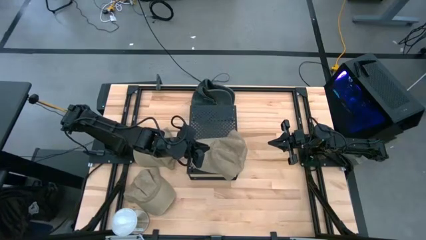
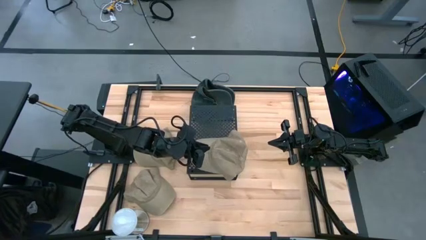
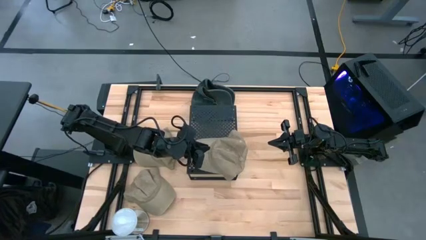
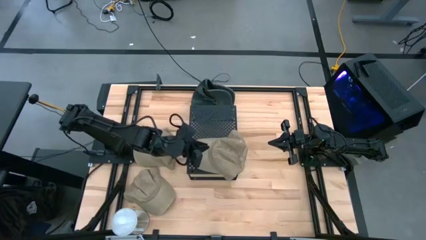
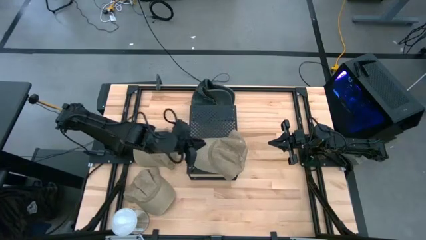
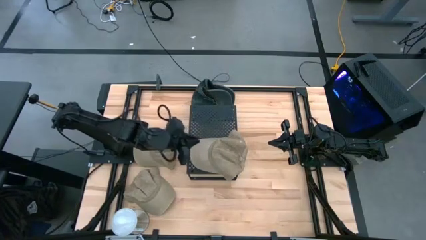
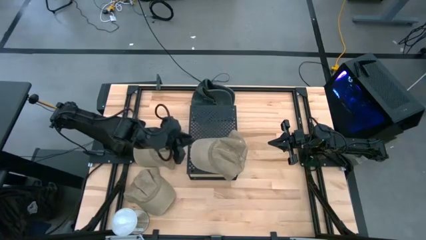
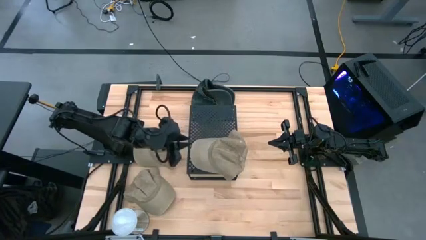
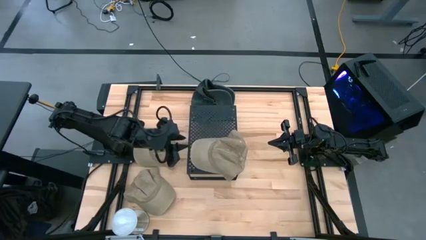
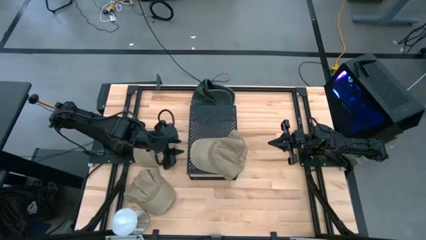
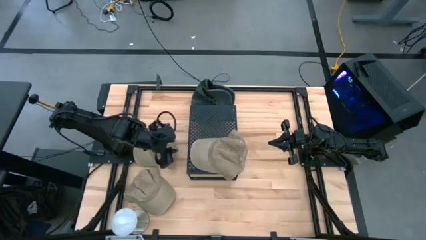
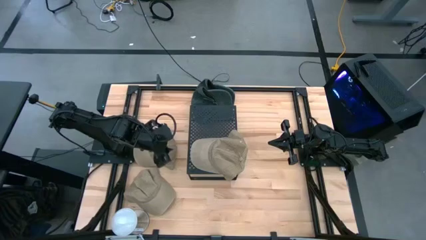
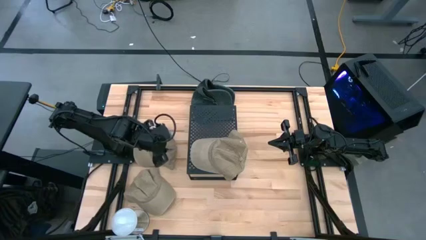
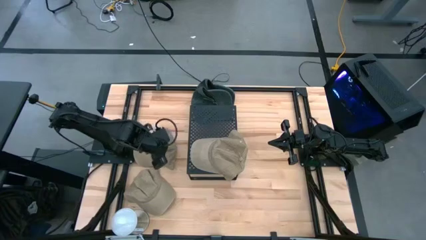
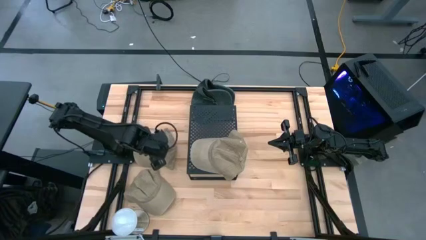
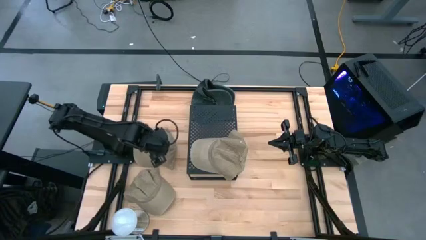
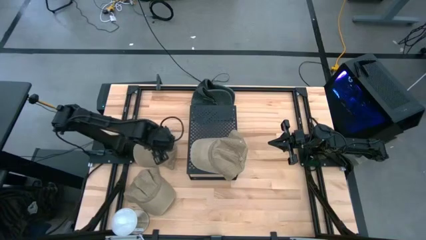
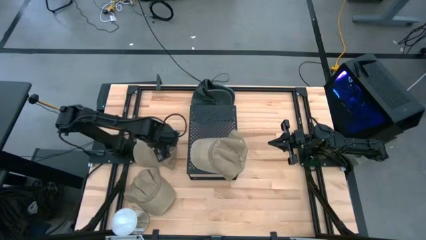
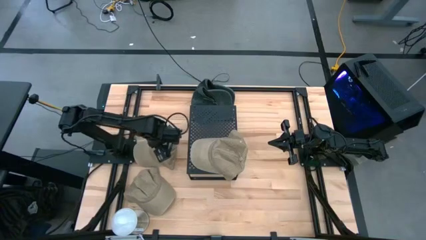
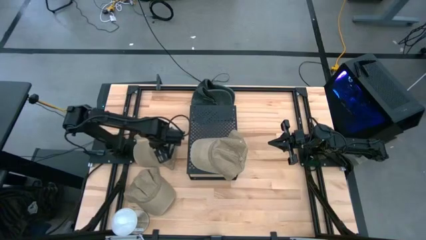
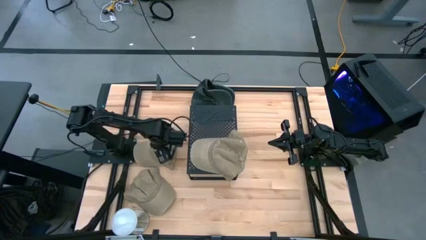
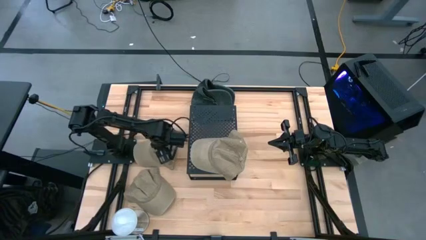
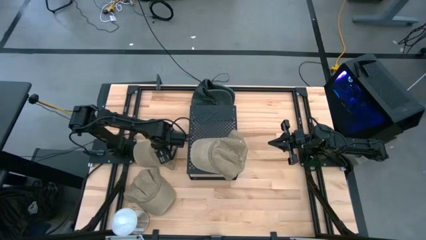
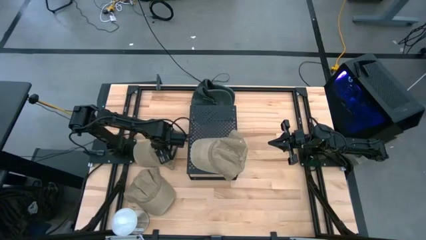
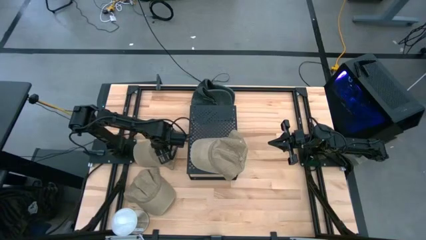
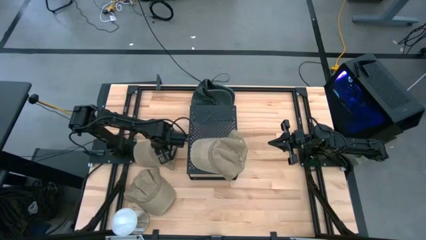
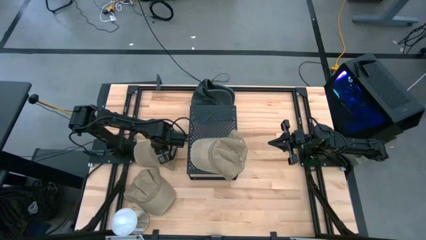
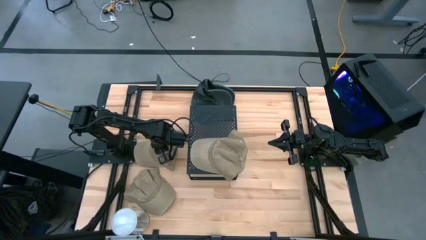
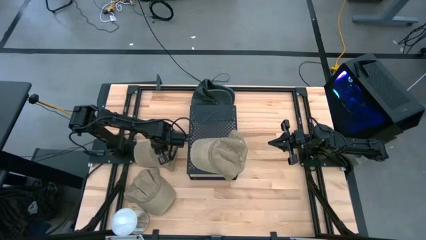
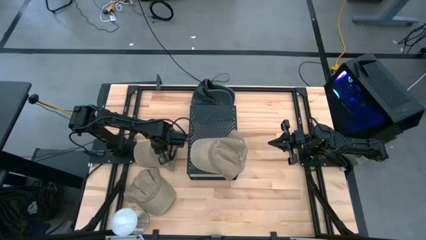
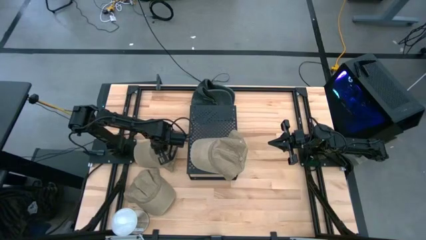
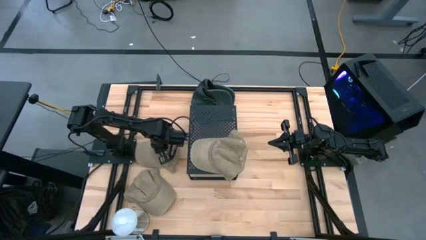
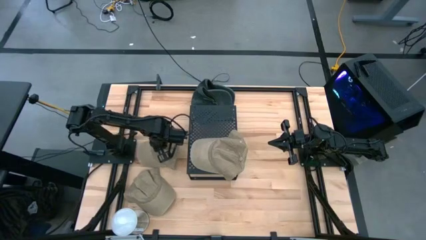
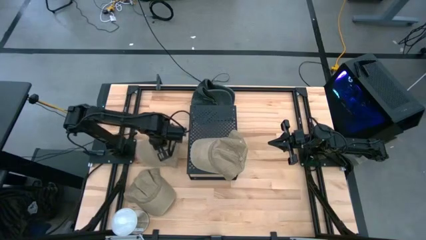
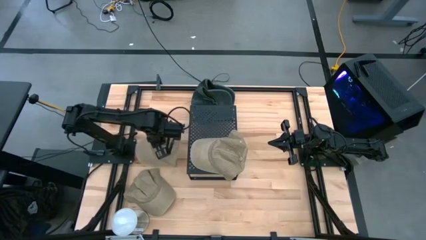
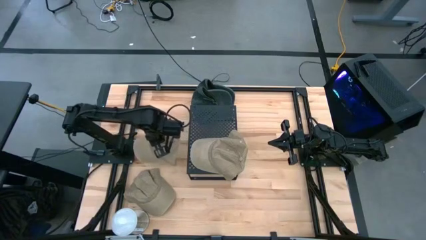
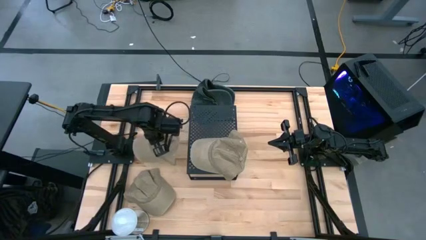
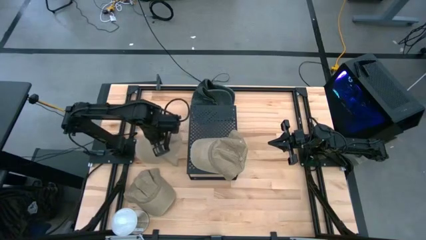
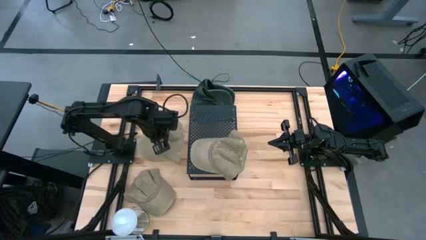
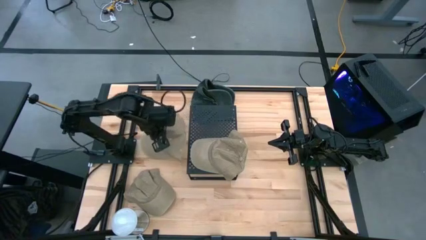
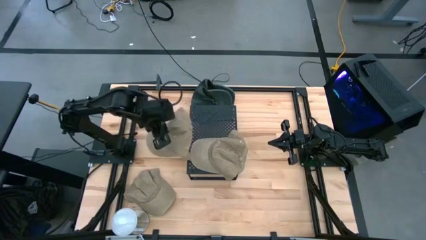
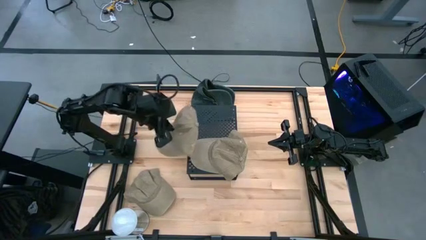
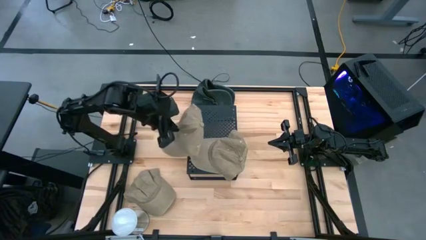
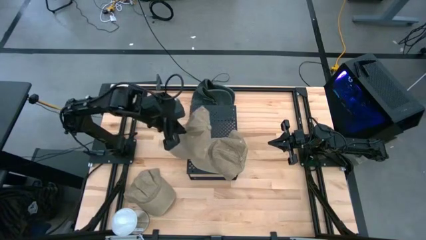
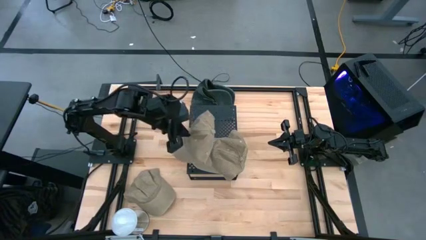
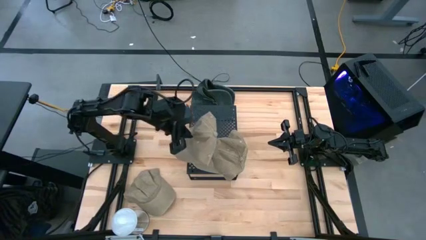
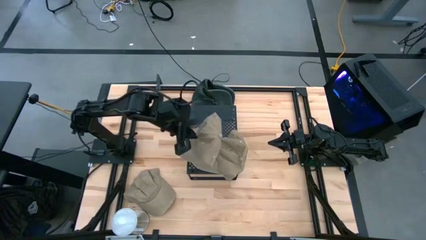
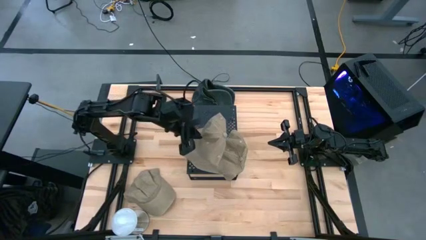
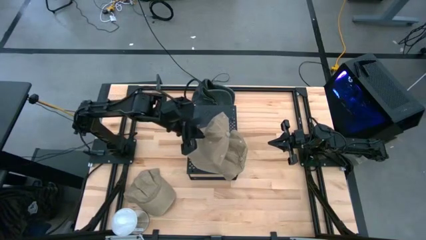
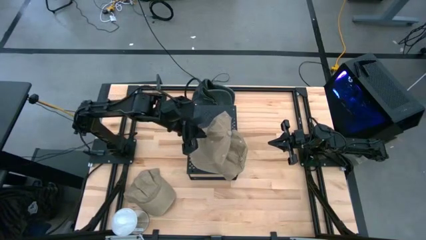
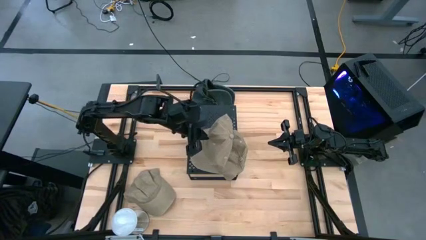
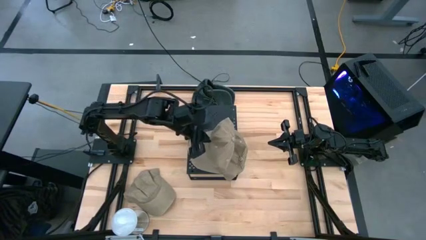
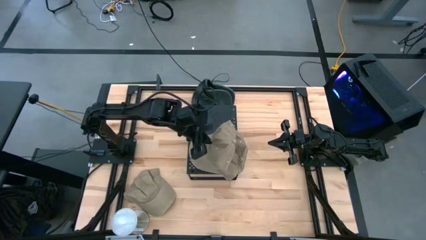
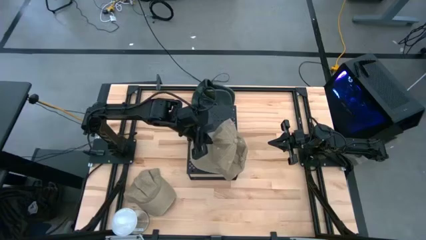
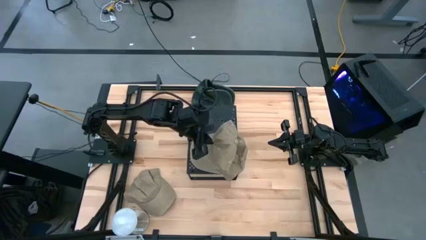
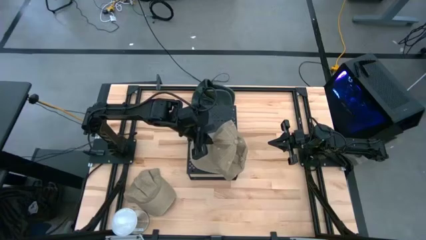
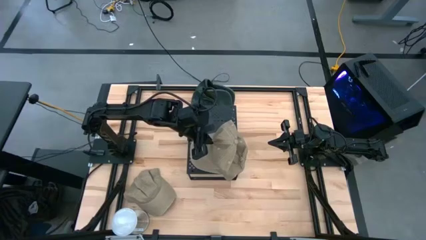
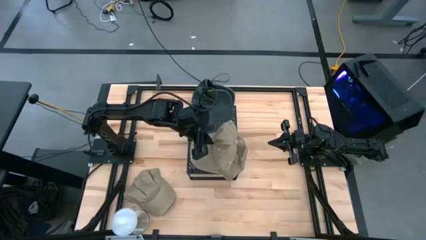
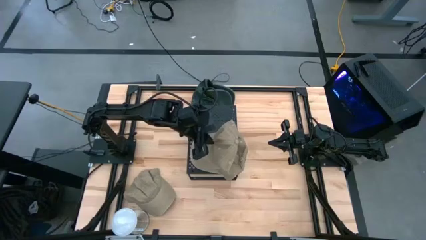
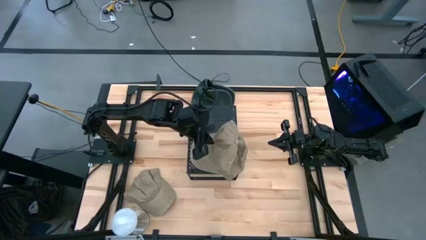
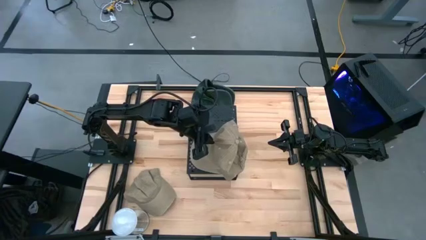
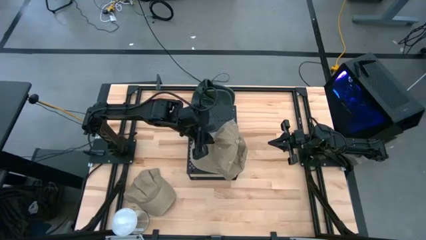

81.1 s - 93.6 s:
Task: Pick & Place hat
Stack the top brown cap on top of the other brown cap on the shelf
